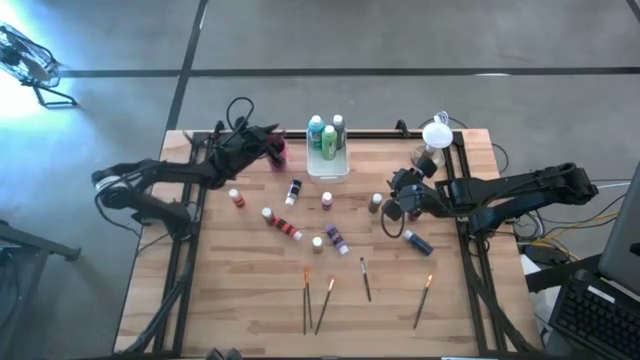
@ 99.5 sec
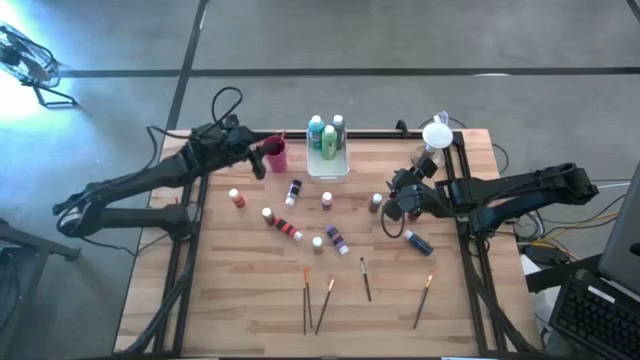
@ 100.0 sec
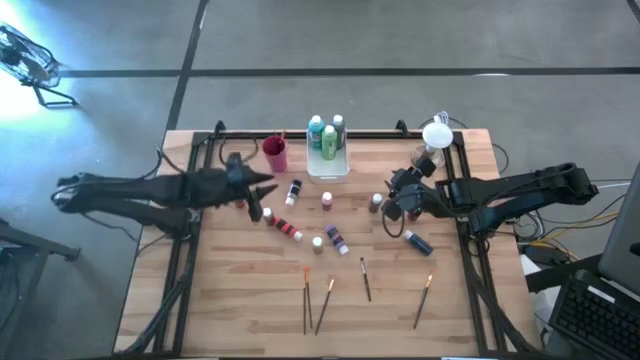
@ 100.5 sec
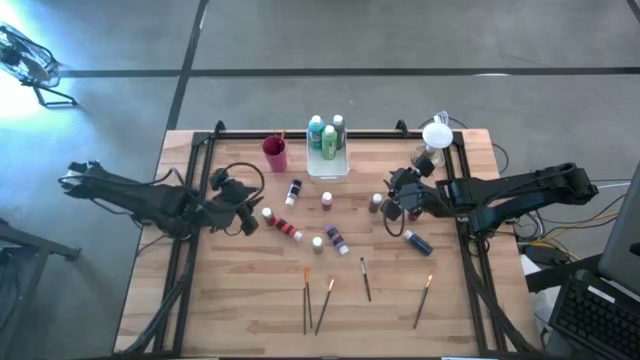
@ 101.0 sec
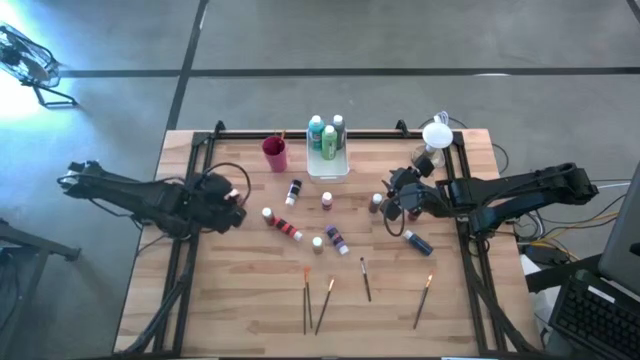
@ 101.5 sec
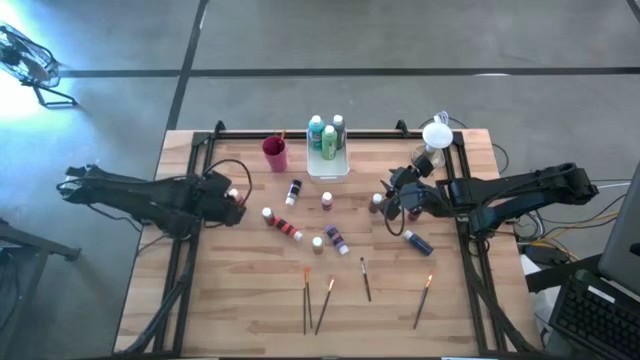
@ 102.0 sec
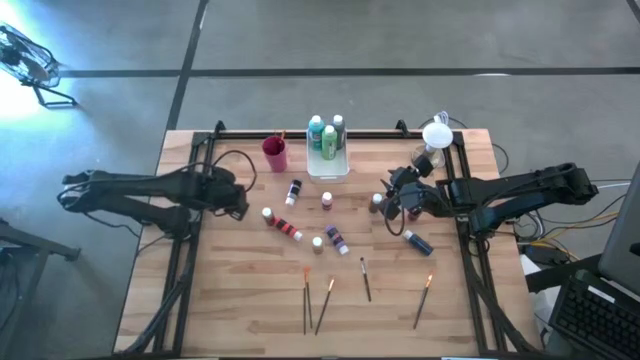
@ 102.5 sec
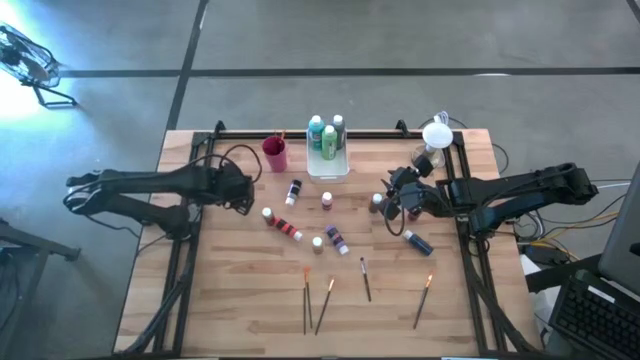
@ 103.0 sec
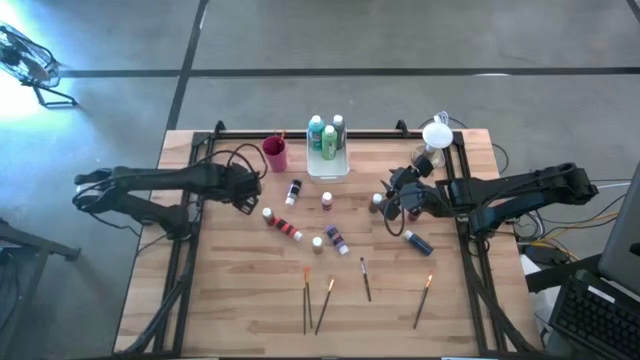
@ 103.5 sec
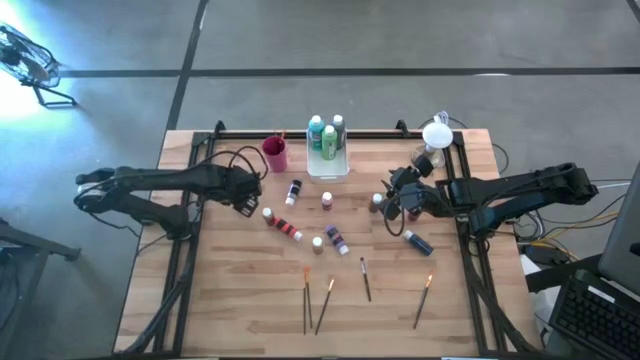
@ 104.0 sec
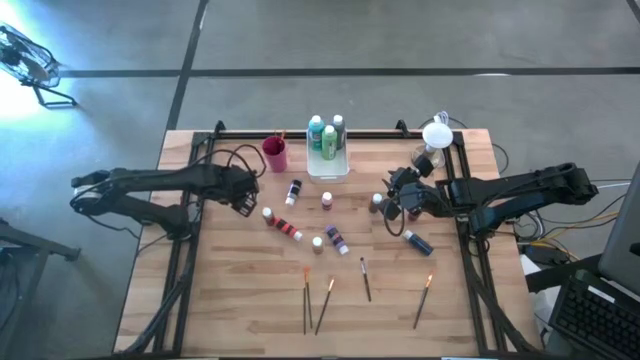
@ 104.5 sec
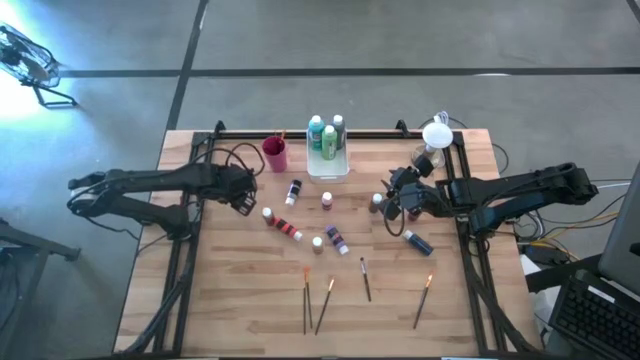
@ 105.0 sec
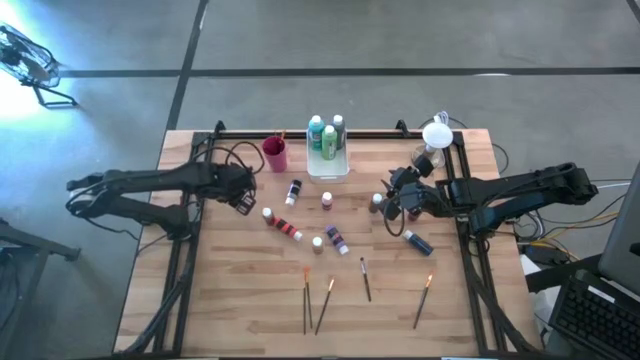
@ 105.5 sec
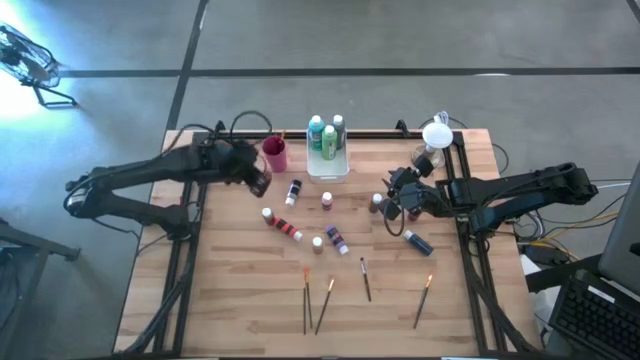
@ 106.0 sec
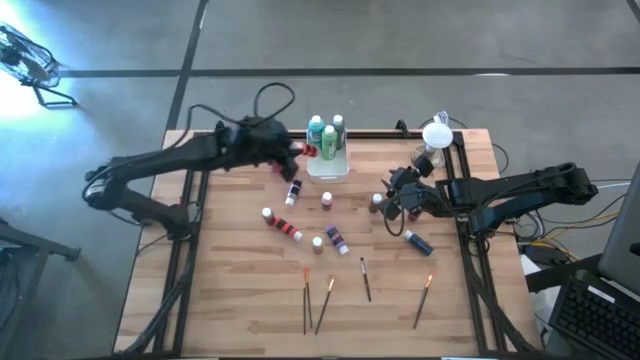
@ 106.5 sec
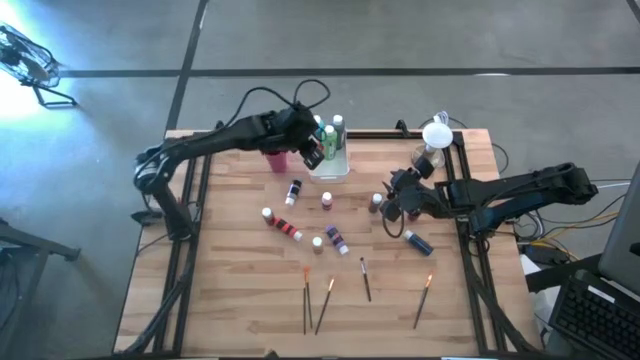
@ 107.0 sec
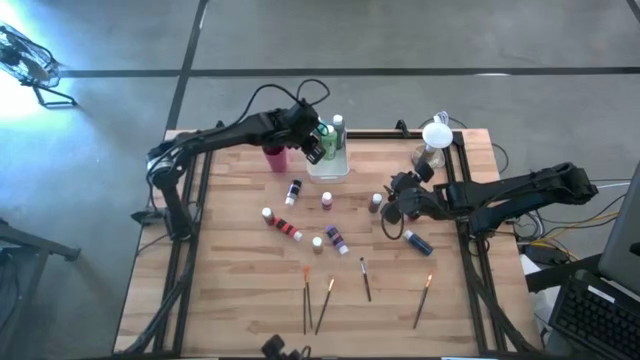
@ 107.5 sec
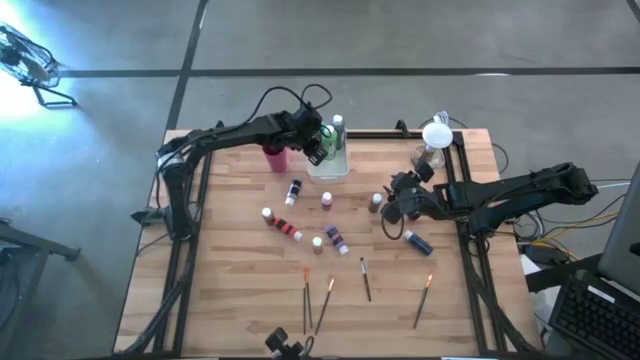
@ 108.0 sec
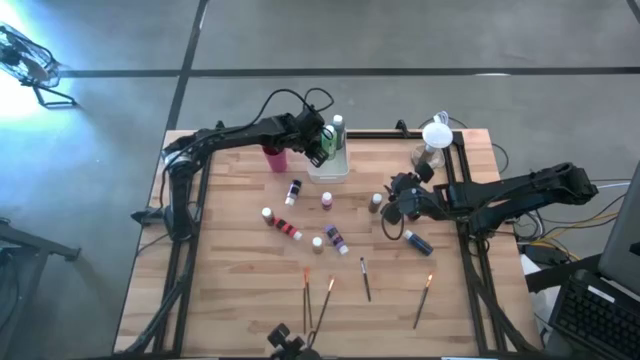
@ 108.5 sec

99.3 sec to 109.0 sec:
Task: Pick & Place Paint Supplies
Put the orange paint bottle into the white bin

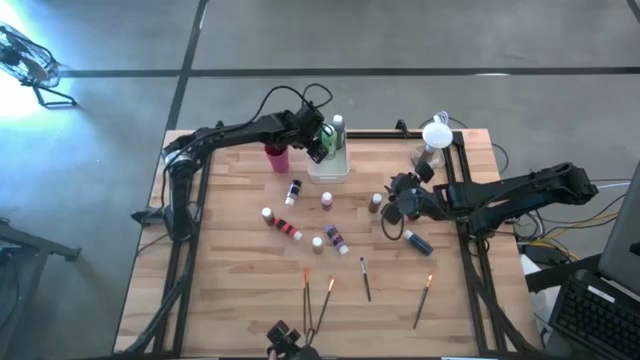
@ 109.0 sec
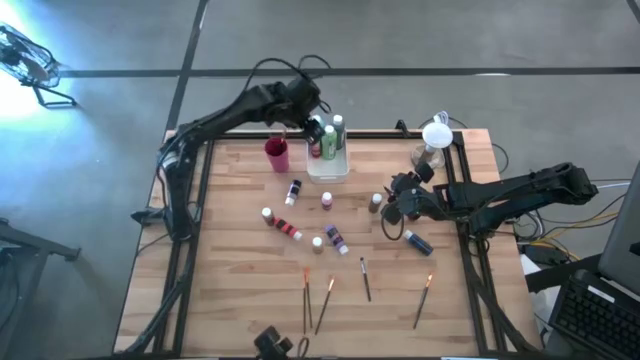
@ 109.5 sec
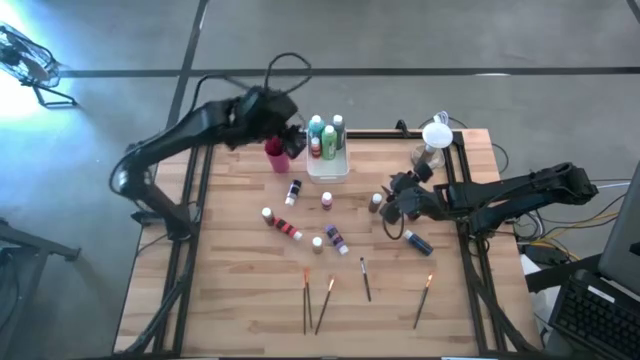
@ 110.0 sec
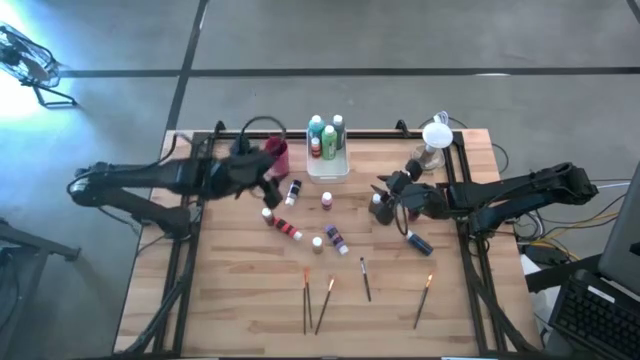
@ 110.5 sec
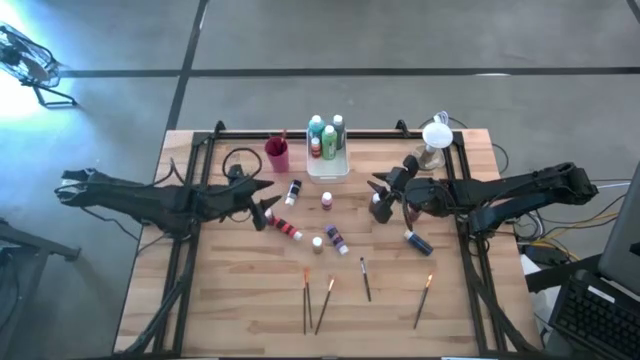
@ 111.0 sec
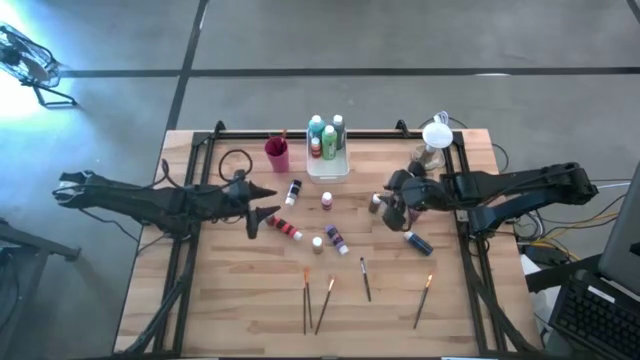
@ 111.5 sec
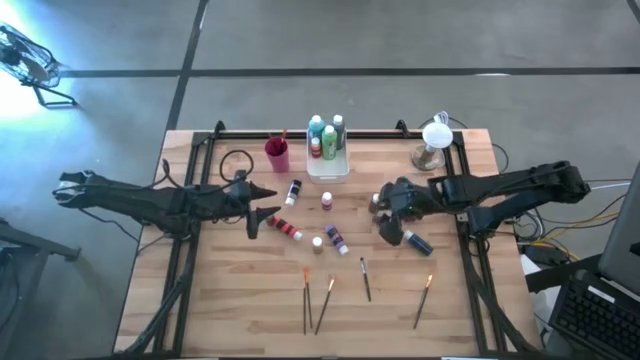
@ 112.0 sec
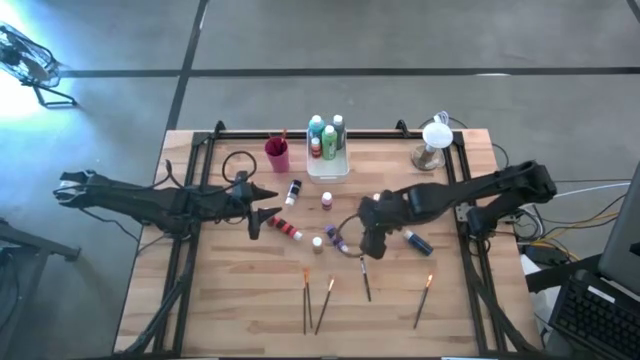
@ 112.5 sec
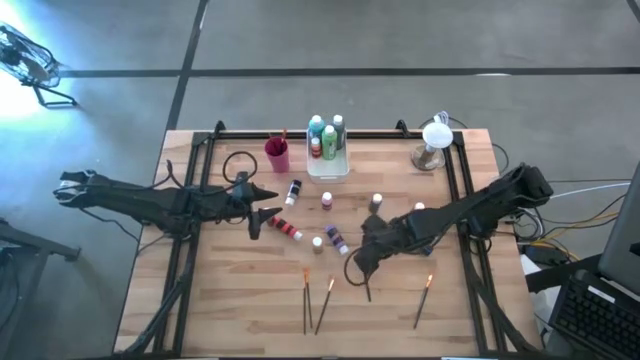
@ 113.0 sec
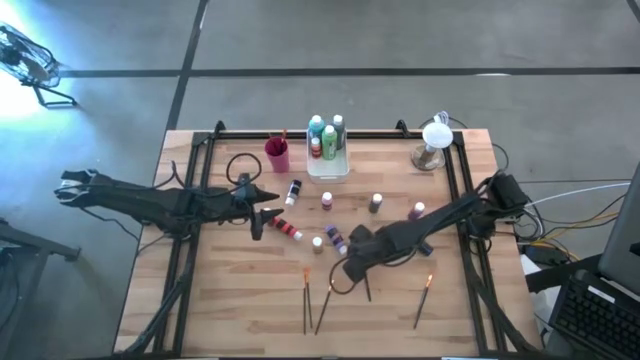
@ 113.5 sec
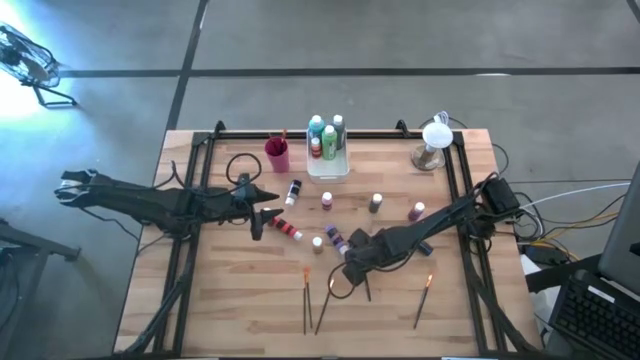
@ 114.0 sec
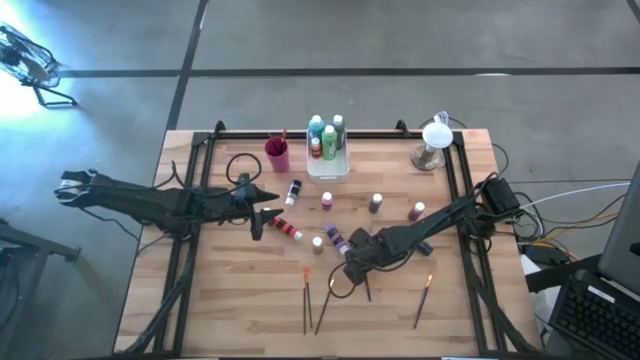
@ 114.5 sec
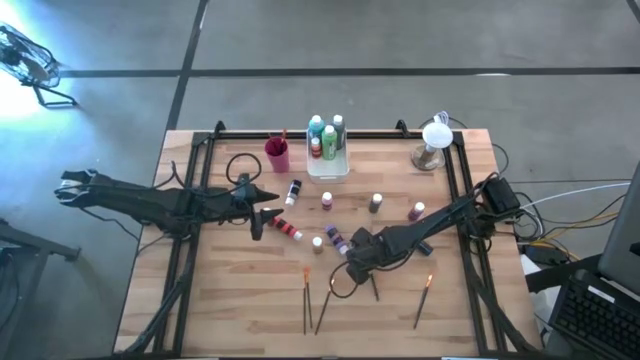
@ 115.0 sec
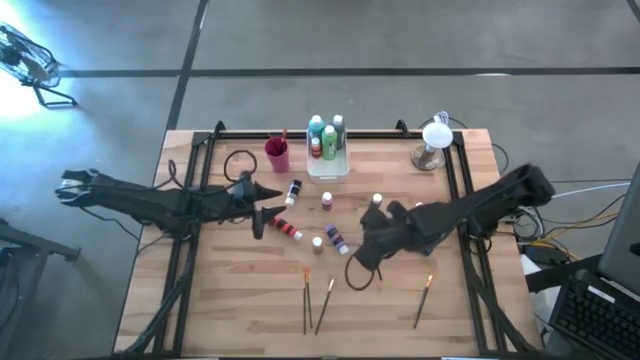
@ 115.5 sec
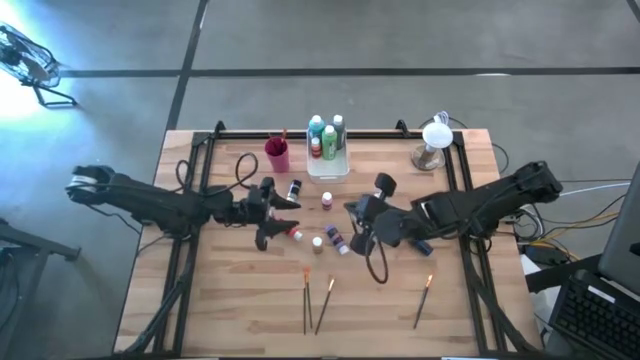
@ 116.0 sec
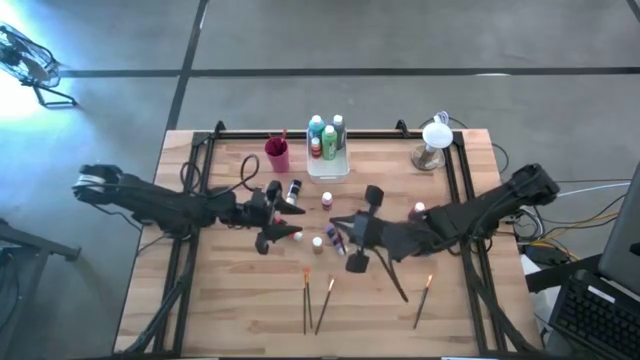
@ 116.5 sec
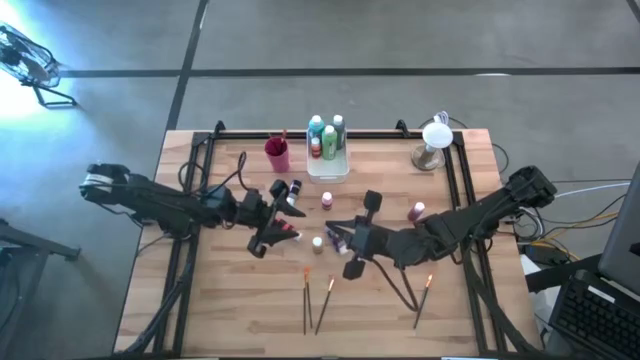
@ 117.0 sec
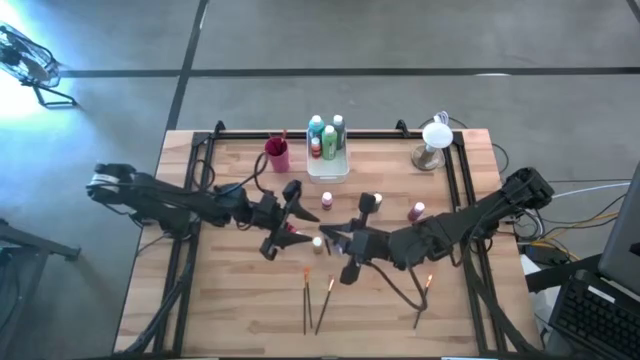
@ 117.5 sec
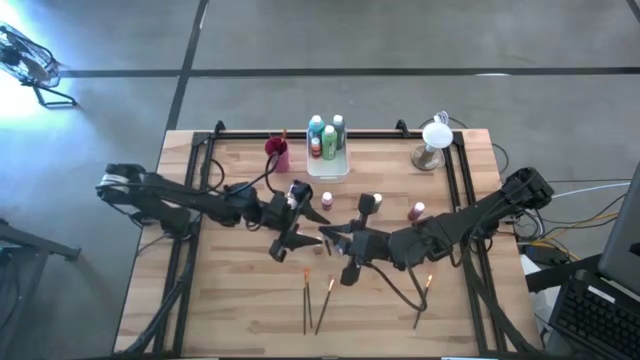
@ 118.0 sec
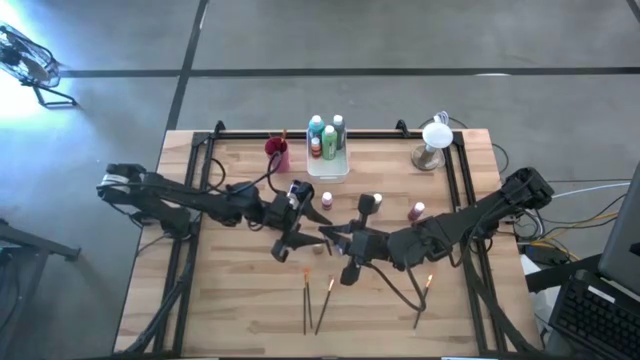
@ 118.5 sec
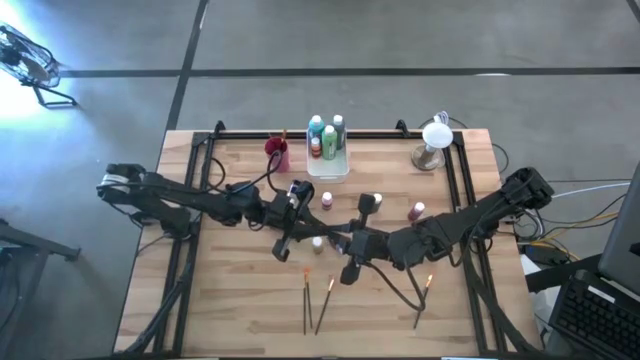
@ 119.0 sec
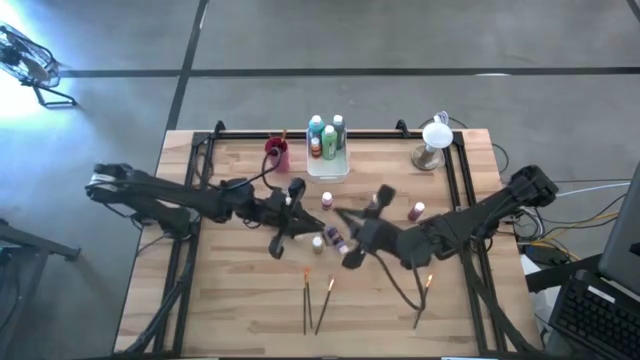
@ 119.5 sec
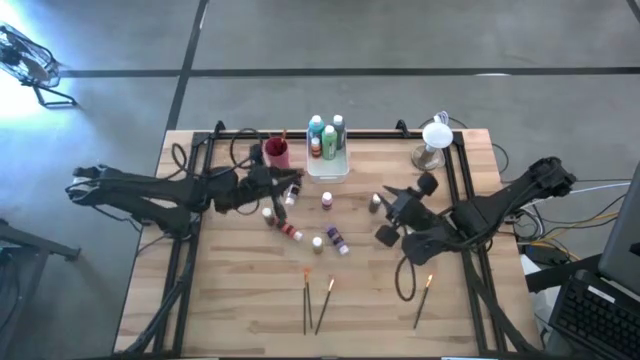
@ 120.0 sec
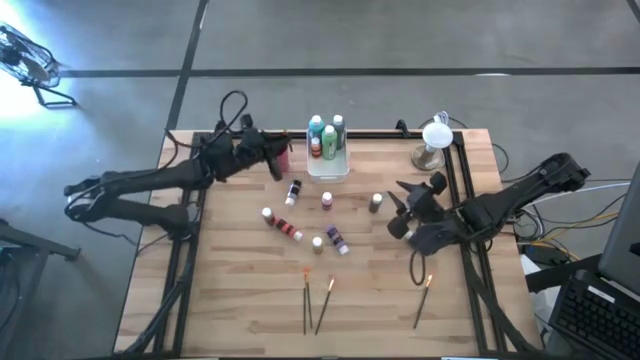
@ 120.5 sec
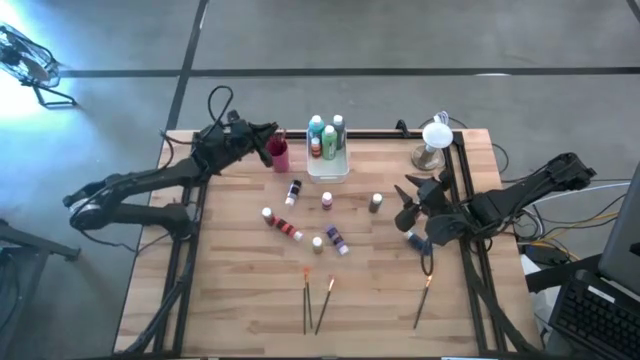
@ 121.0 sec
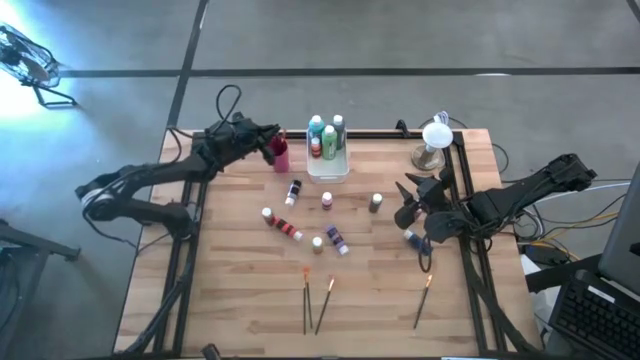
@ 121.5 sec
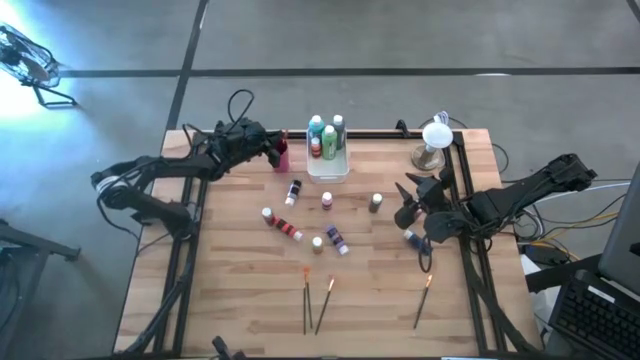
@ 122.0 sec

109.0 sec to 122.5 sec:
Put the silver paint brush into the pink cup
